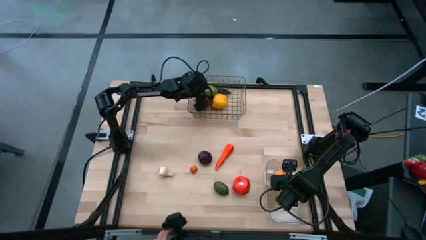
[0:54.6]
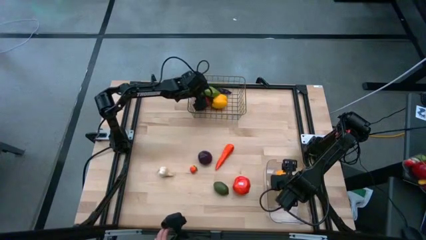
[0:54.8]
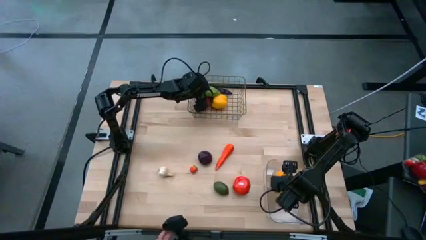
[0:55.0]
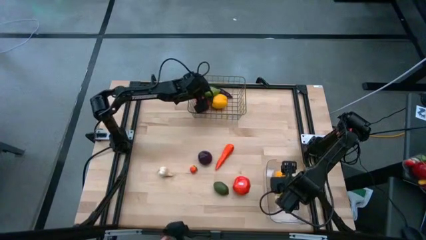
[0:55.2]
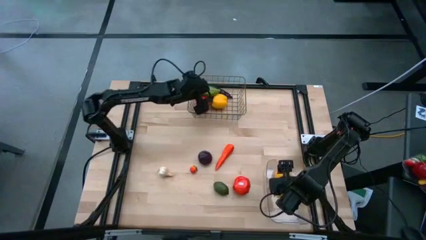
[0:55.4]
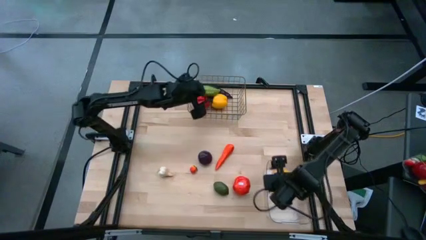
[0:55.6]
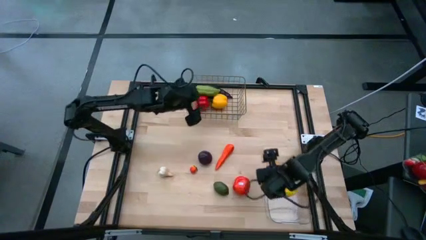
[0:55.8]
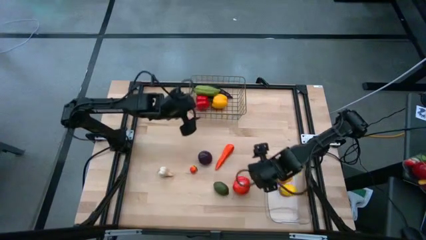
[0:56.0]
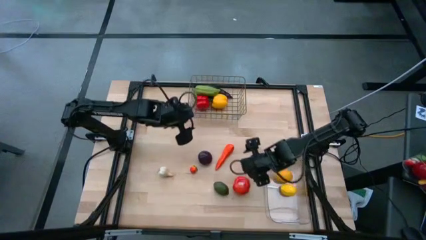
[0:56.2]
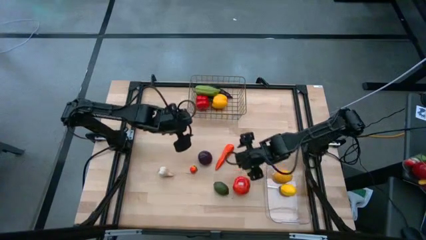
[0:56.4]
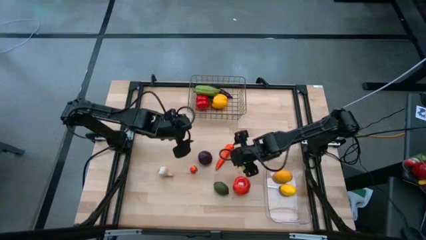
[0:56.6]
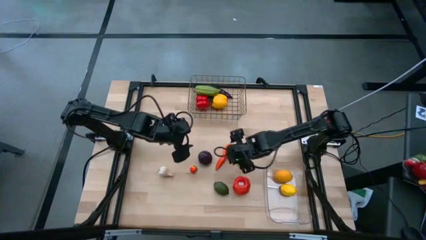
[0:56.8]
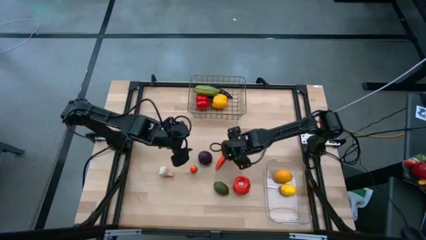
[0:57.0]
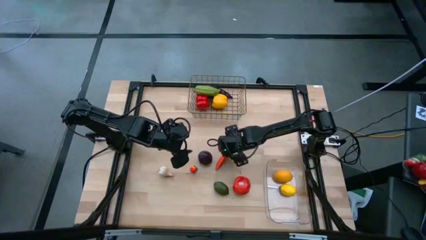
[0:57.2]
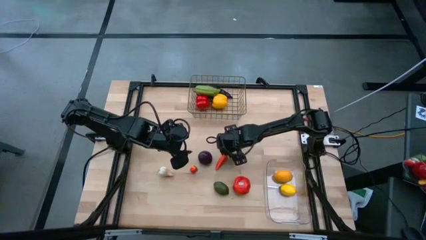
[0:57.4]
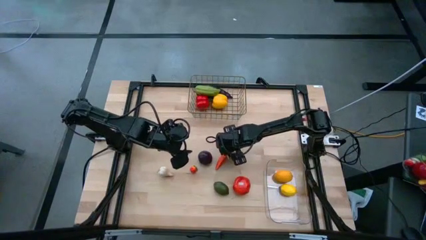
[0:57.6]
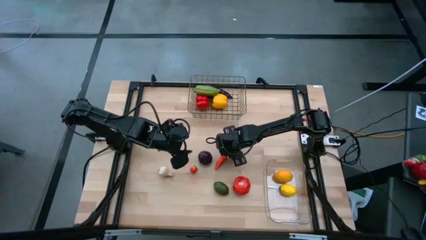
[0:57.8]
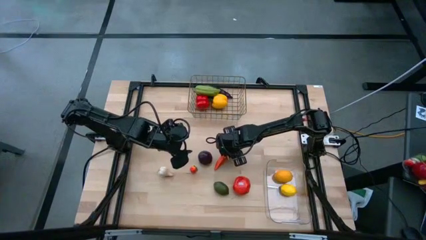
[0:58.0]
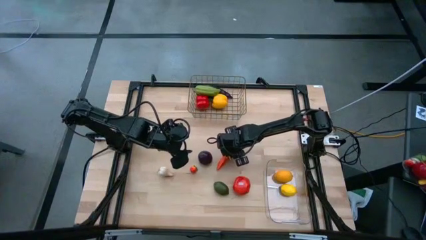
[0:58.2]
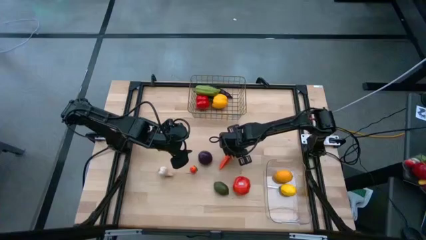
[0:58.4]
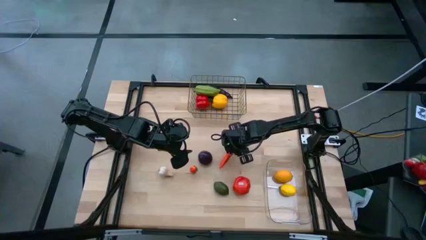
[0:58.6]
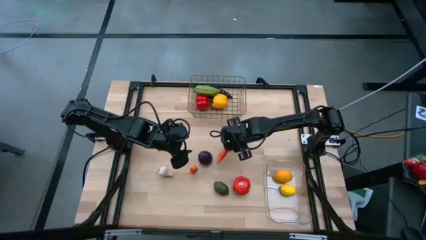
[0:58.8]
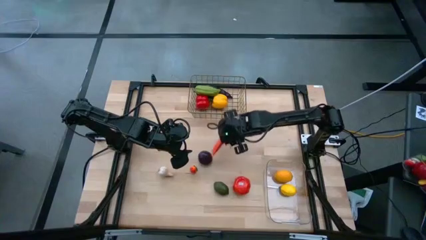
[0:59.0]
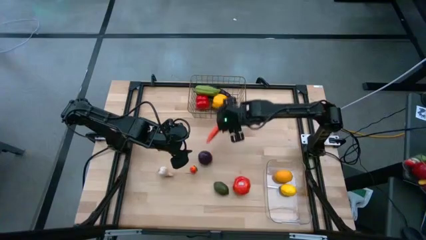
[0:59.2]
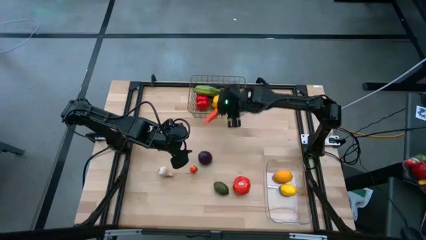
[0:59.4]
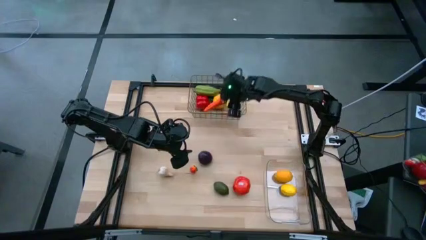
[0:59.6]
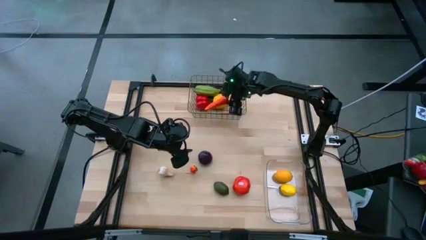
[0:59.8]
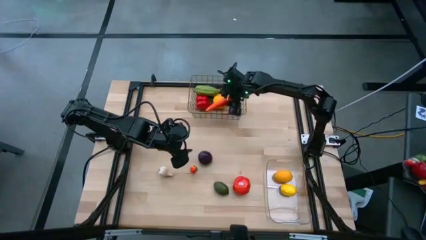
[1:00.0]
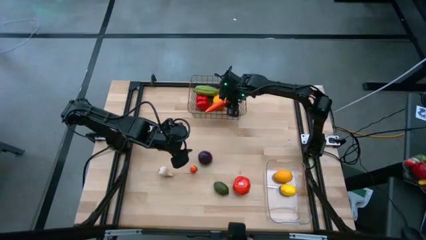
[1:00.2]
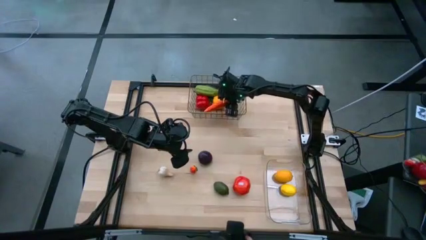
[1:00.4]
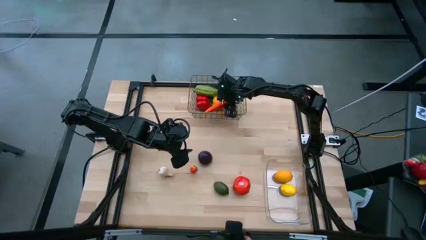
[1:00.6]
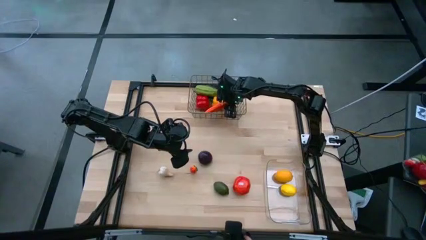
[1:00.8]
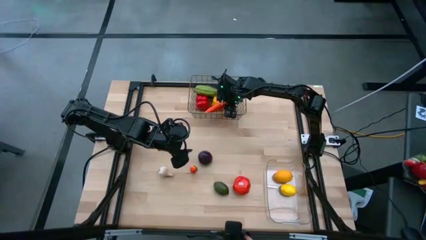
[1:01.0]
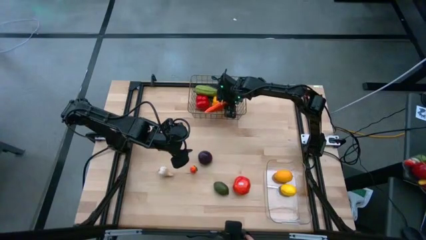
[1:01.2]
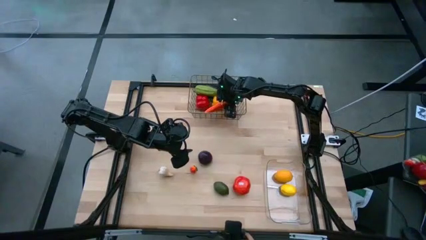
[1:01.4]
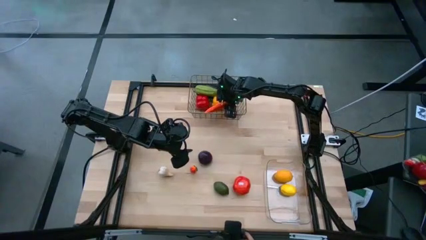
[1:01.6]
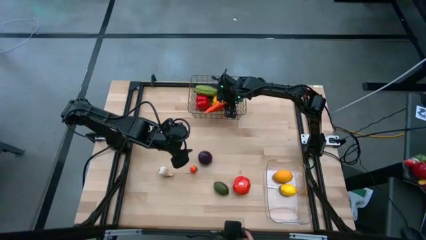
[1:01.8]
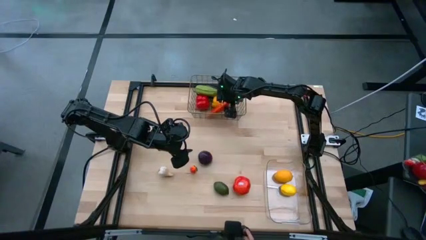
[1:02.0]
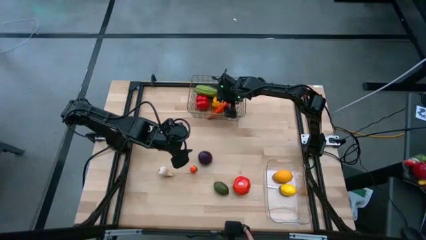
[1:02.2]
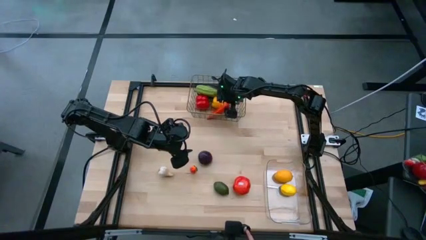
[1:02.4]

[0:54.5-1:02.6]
Task: Sort produce into baskets
Put the orange carrot into the wire basket

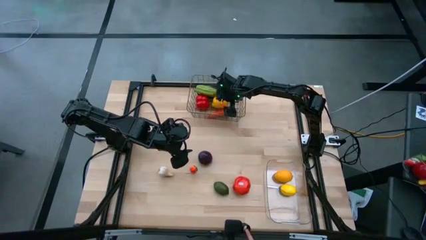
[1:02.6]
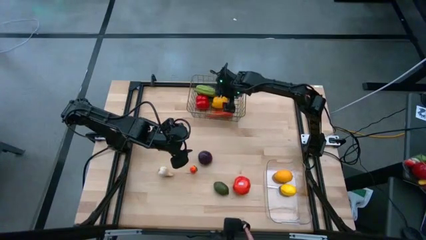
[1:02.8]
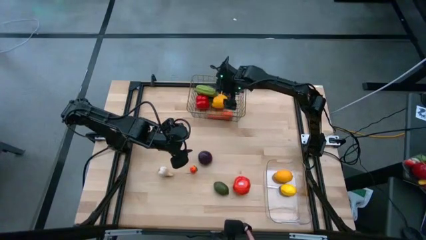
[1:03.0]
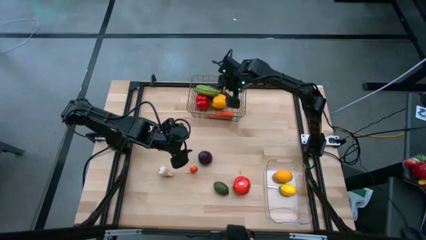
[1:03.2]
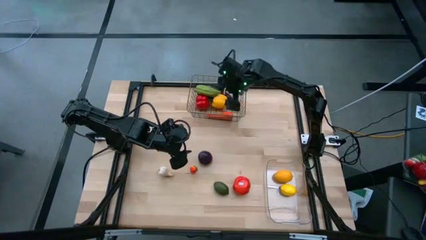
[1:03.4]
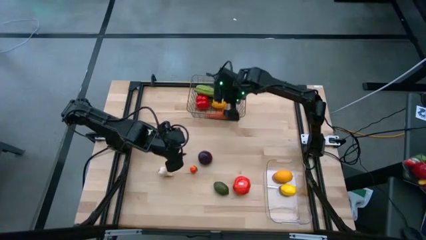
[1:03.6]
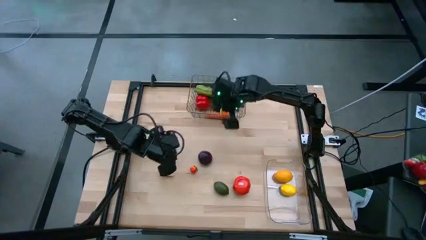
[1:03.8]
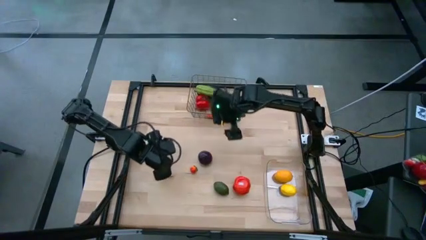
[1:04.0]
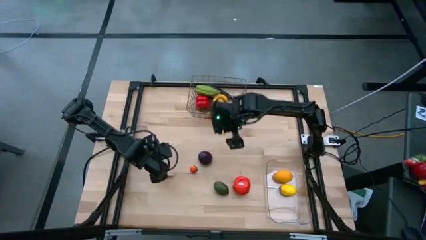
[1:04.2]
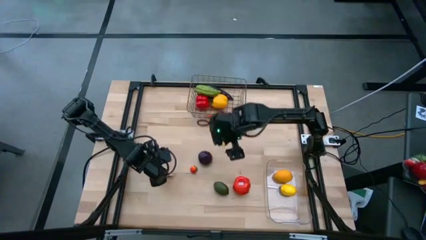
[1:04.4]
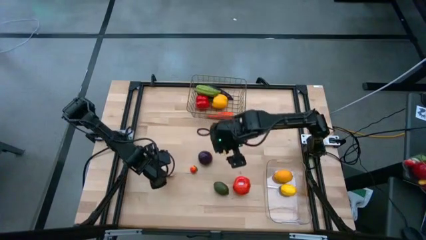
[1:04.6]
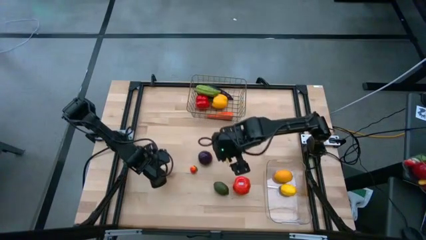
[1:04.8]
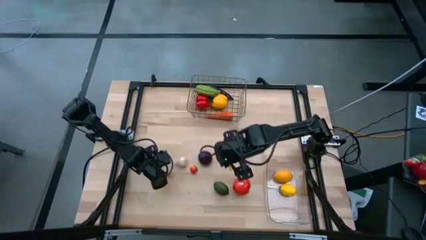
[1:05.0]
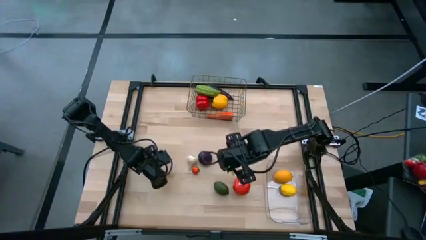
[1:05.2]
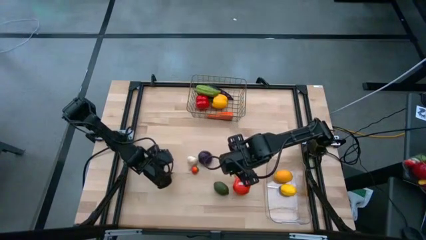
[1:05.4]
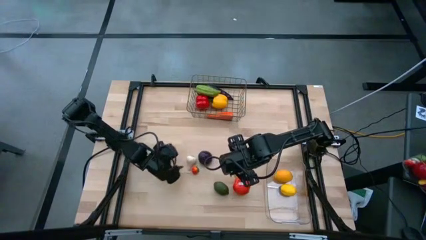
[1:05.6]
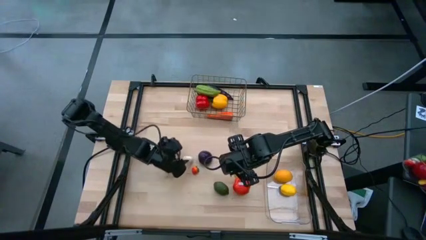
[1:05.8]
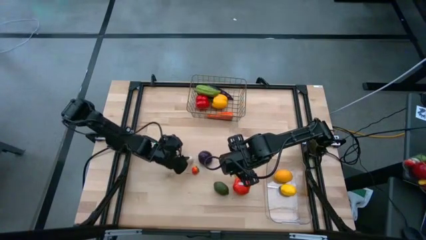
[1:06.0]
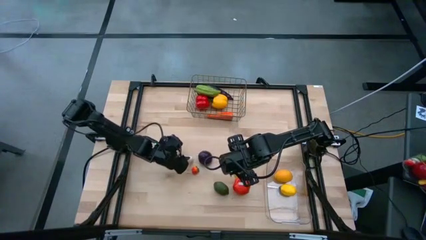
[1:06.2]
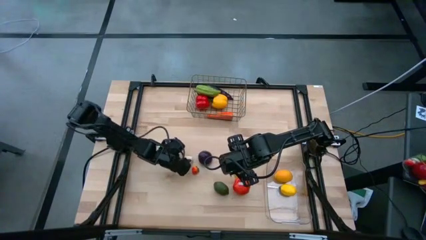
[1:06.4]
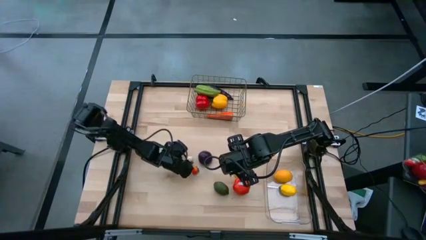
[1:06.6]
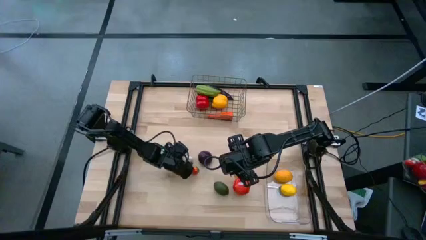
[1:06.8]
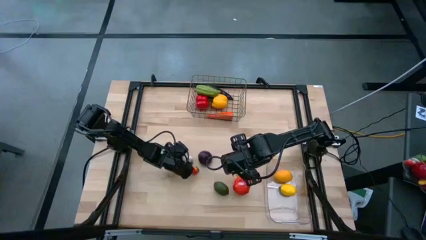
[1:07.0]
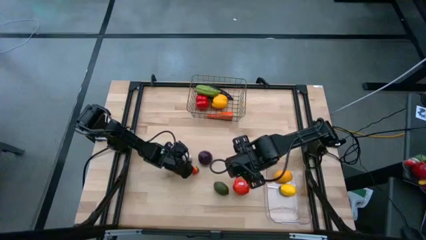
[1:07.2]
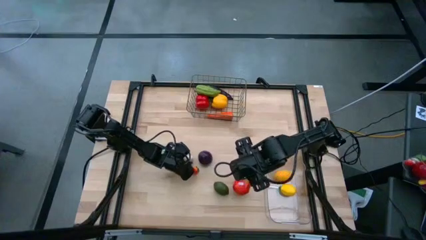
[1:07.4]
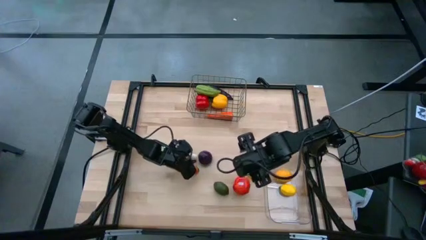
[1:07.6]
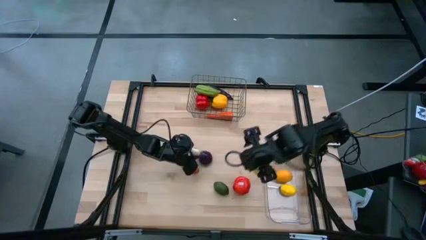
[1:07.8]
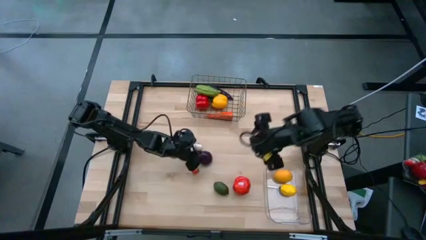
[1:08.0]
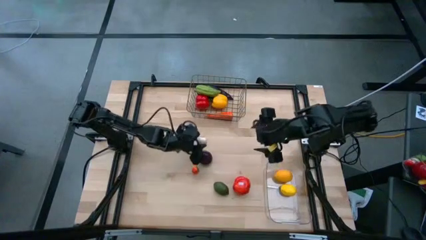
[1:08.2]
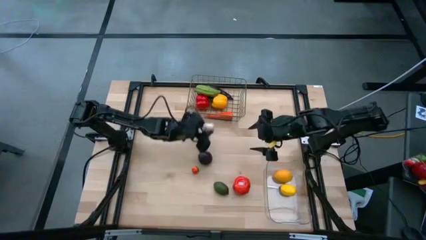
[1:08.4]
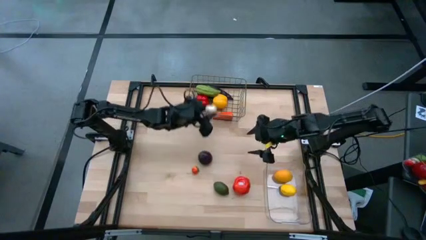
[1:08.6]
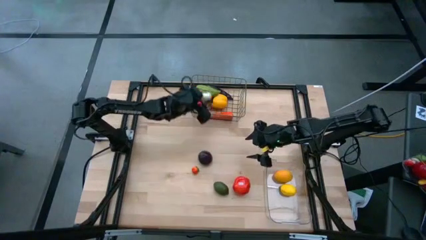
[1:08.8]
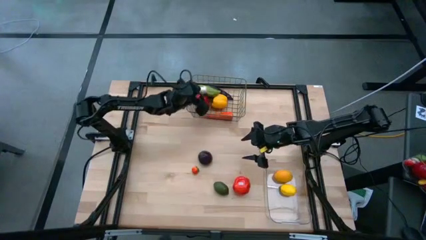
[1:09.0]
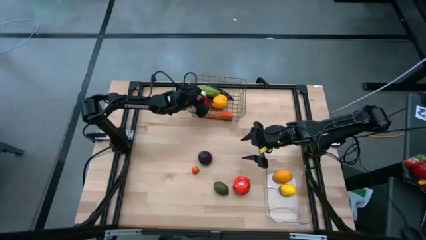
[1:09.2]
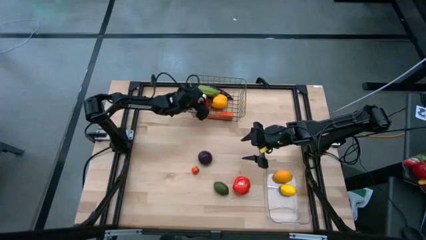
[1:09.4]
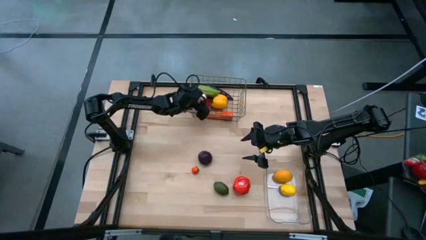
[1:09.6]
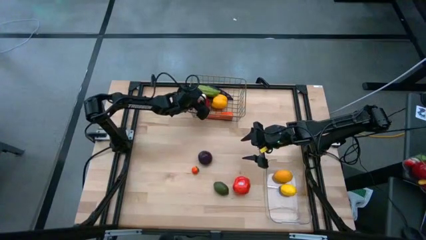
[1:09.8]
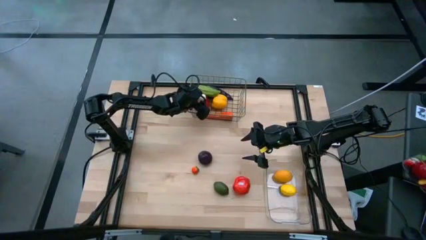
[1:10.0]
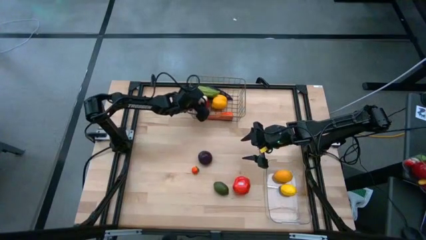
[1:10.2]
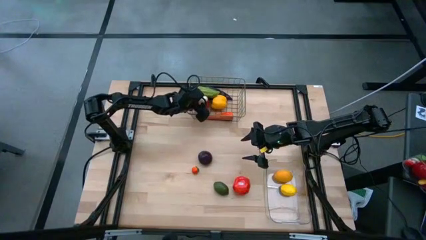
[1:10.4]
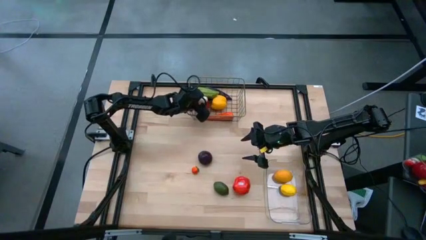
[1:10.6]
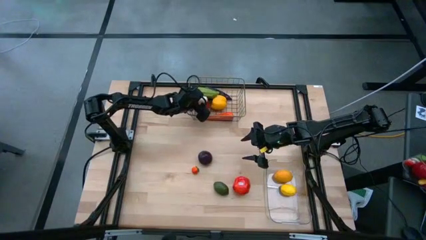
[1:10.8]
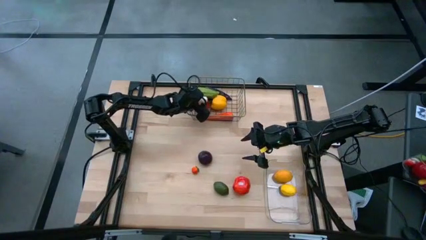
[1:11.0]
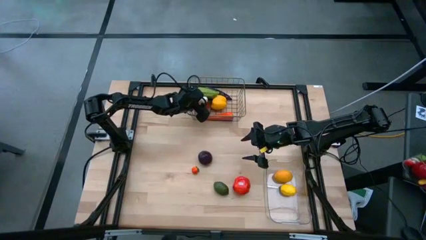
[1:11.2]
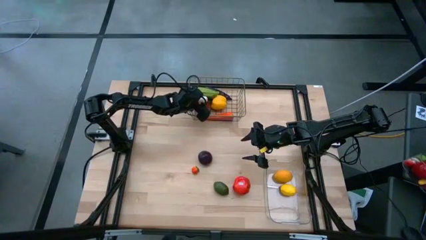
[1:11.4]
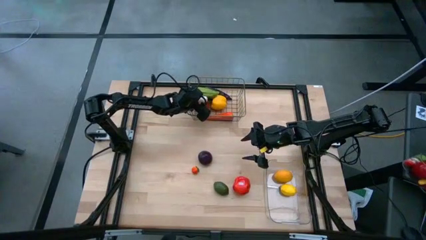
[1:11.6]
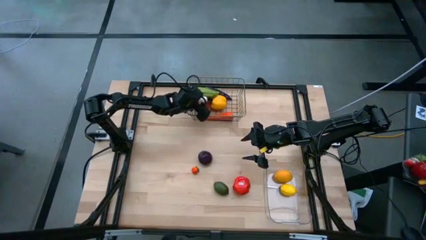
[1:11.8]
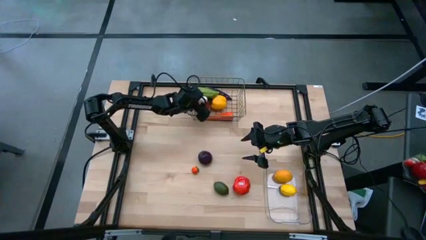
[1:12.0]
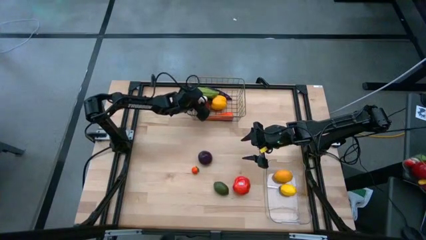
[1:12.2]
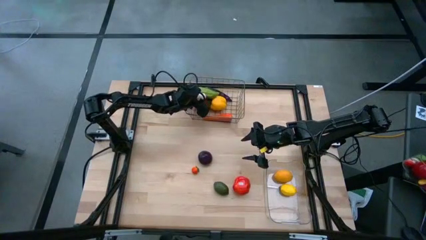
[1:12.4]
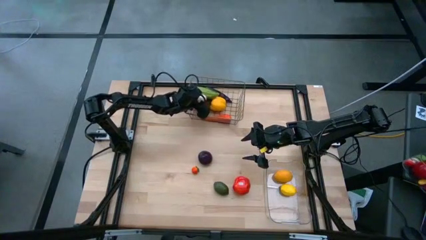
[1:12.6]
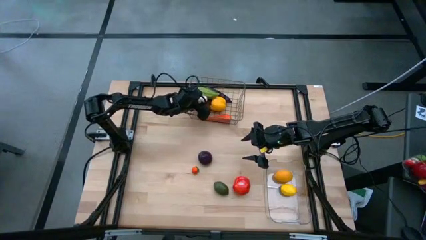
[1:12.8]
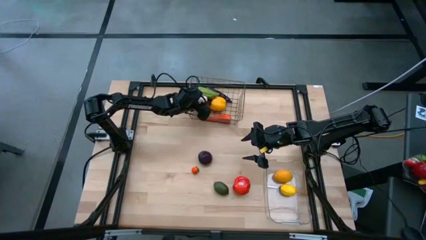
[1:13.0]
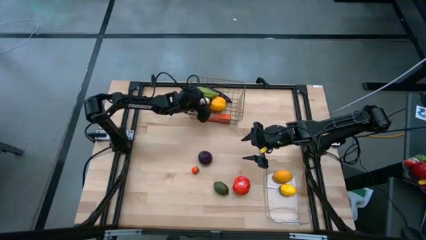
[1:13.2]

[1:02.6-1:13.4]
Put the white garlic into the wire basket
